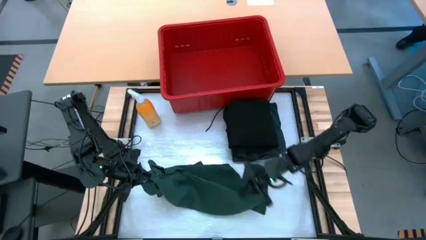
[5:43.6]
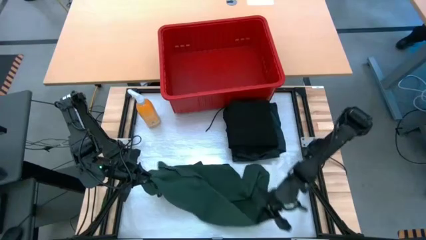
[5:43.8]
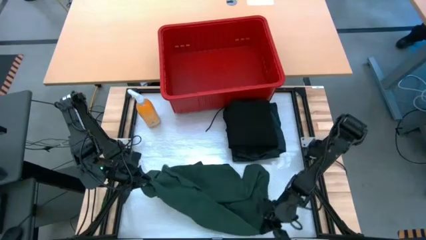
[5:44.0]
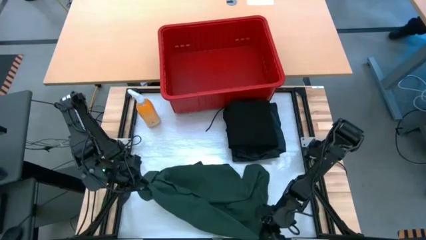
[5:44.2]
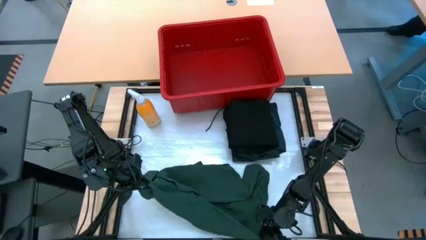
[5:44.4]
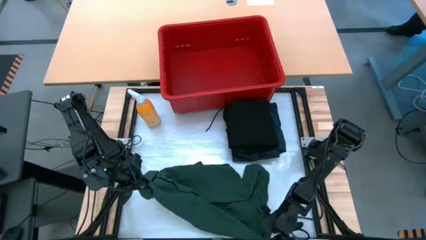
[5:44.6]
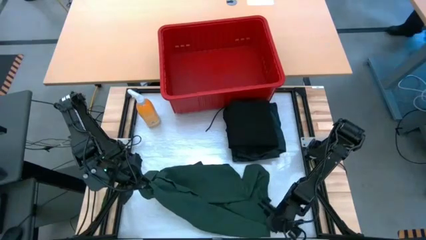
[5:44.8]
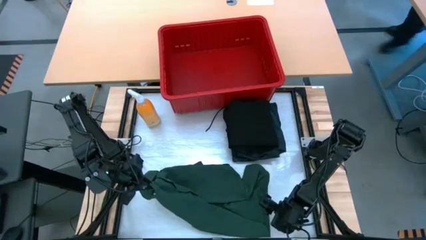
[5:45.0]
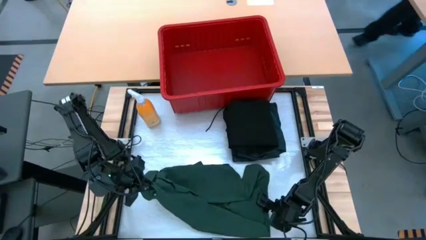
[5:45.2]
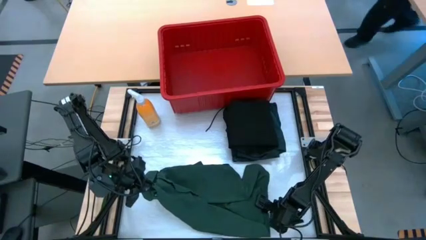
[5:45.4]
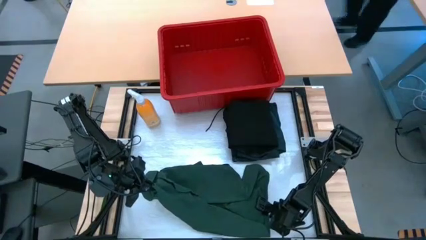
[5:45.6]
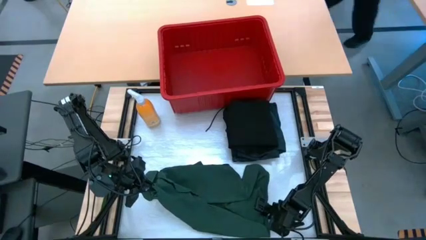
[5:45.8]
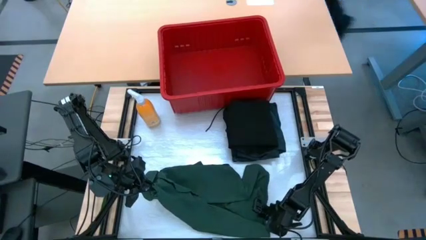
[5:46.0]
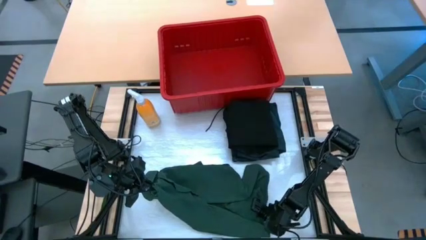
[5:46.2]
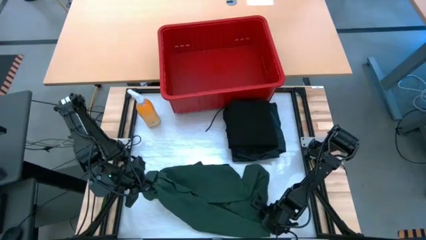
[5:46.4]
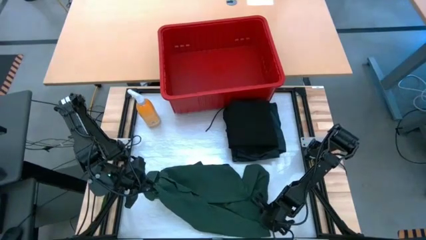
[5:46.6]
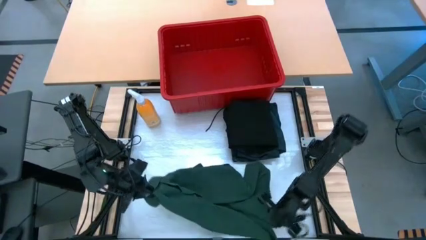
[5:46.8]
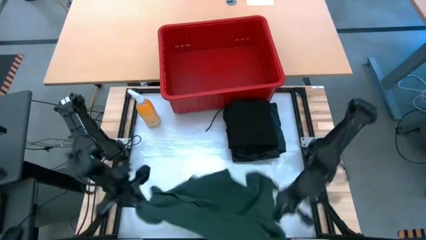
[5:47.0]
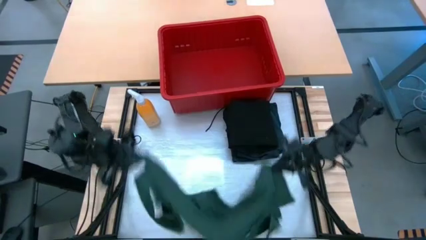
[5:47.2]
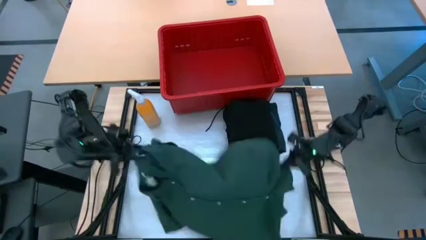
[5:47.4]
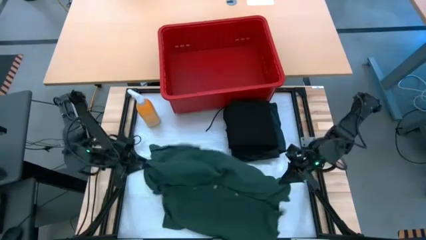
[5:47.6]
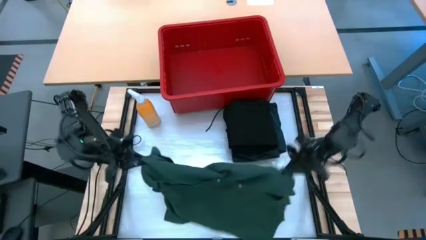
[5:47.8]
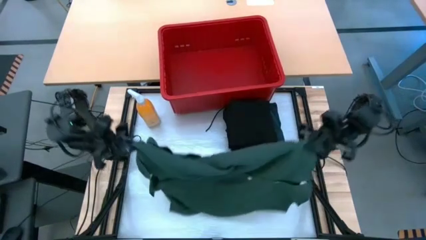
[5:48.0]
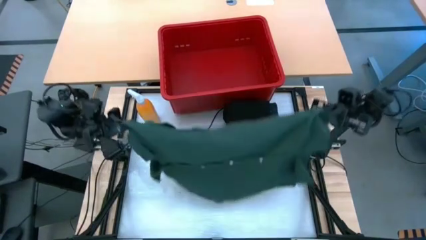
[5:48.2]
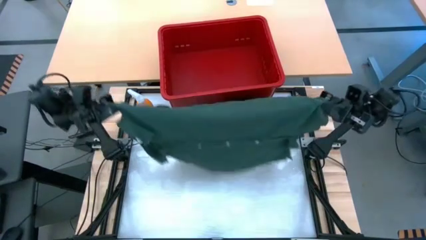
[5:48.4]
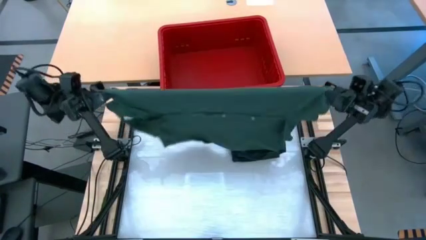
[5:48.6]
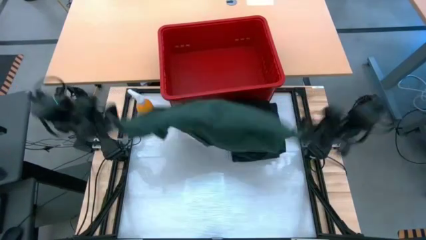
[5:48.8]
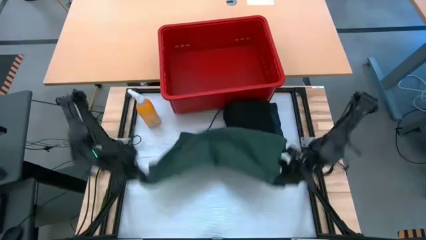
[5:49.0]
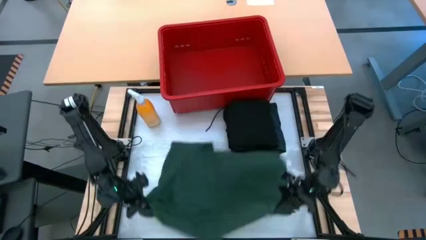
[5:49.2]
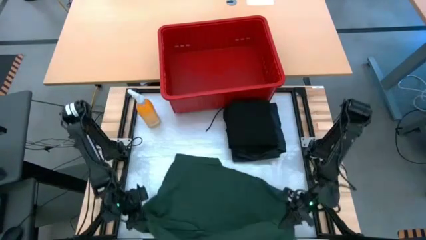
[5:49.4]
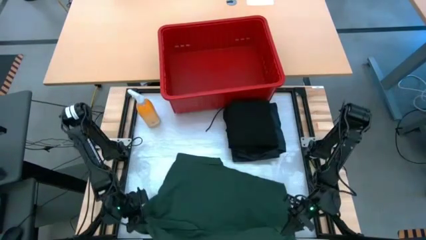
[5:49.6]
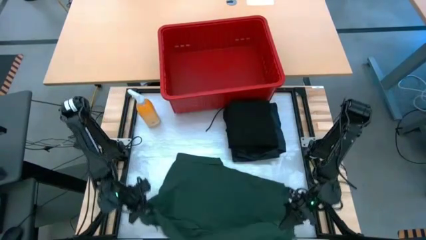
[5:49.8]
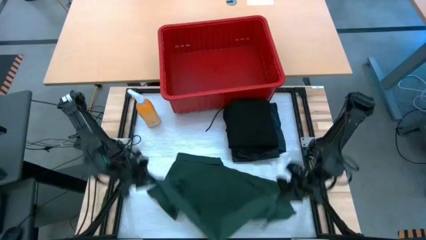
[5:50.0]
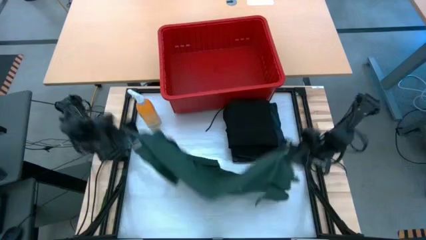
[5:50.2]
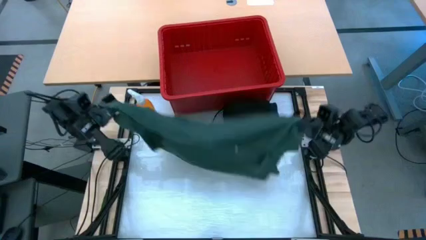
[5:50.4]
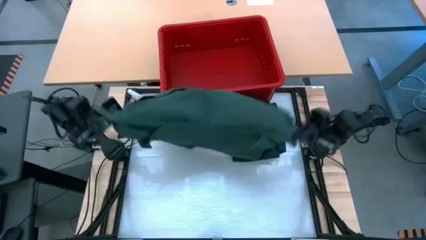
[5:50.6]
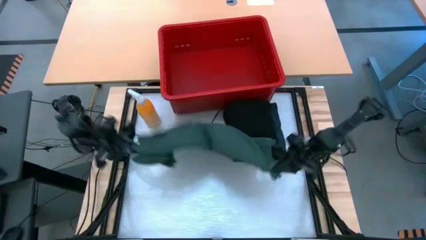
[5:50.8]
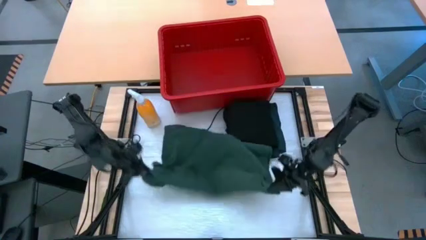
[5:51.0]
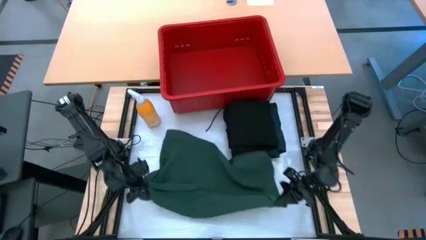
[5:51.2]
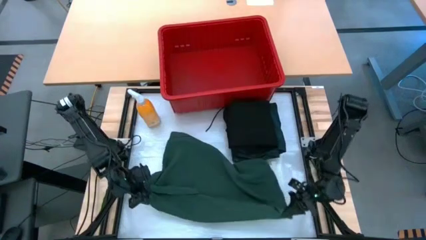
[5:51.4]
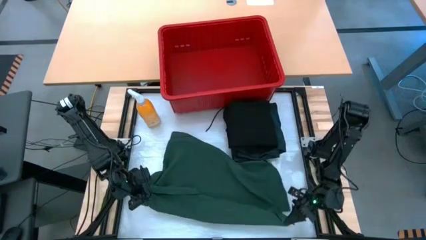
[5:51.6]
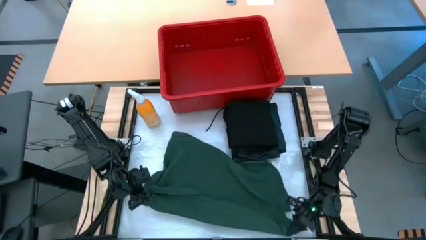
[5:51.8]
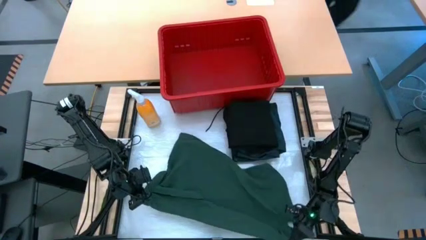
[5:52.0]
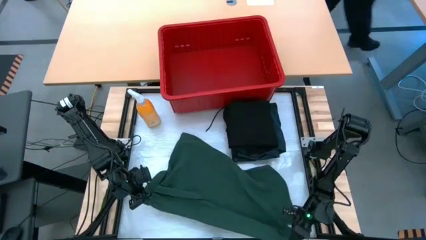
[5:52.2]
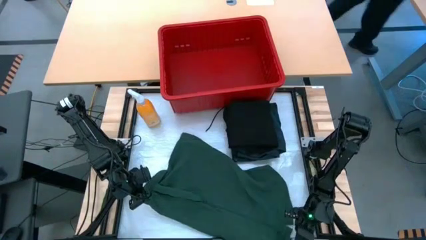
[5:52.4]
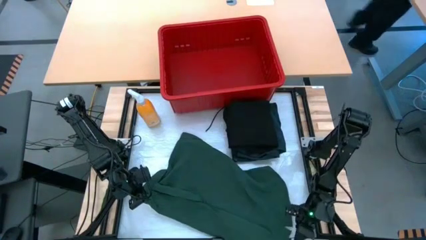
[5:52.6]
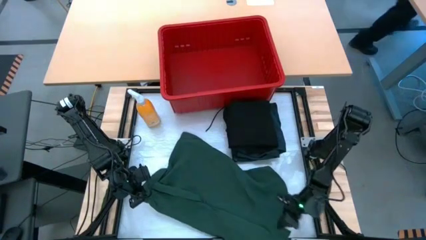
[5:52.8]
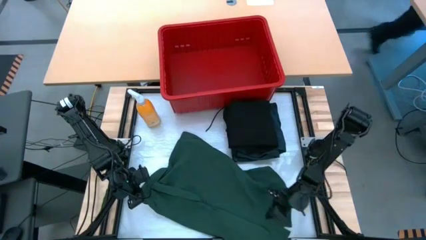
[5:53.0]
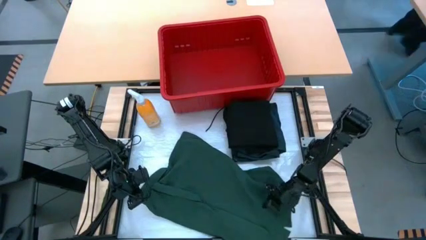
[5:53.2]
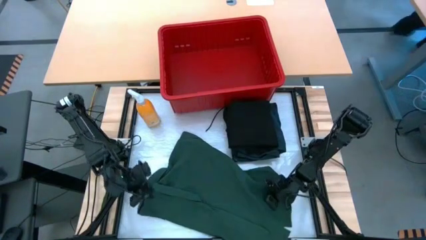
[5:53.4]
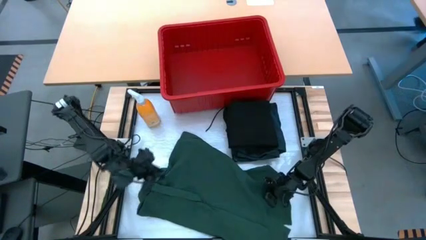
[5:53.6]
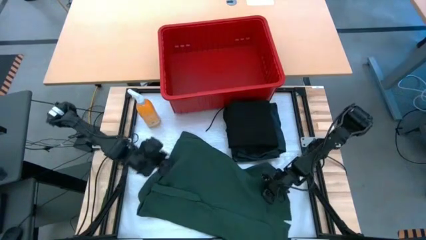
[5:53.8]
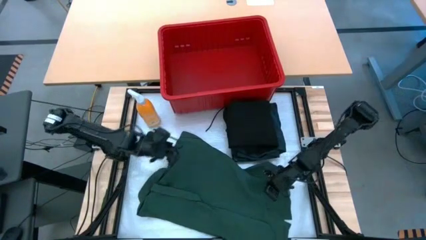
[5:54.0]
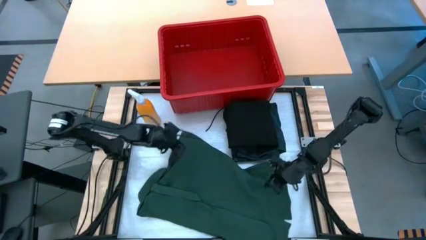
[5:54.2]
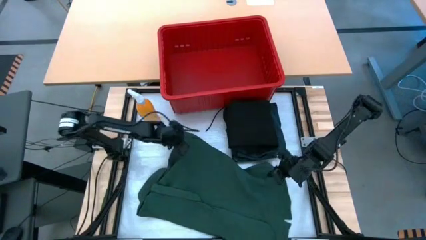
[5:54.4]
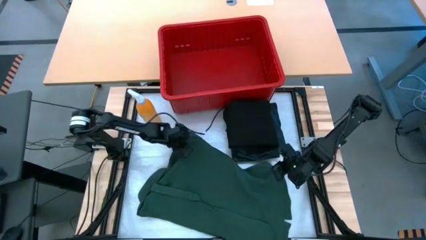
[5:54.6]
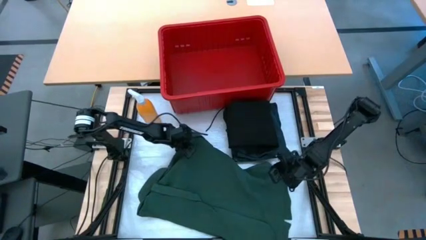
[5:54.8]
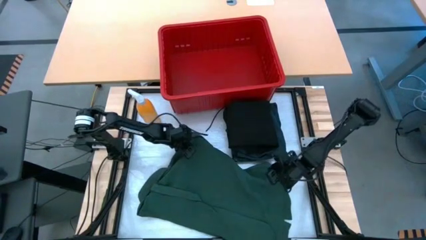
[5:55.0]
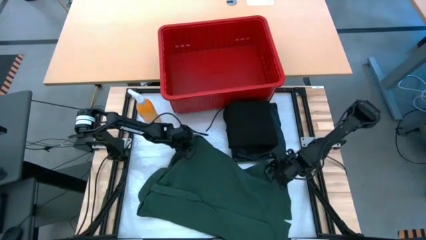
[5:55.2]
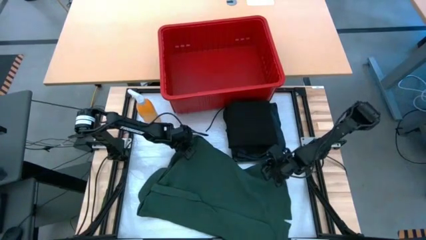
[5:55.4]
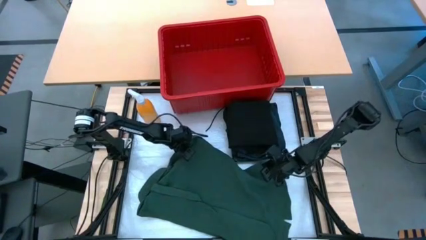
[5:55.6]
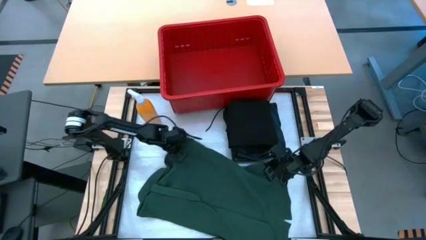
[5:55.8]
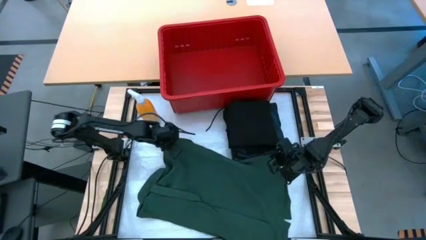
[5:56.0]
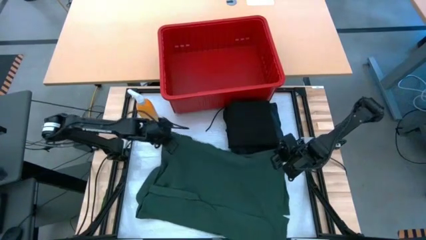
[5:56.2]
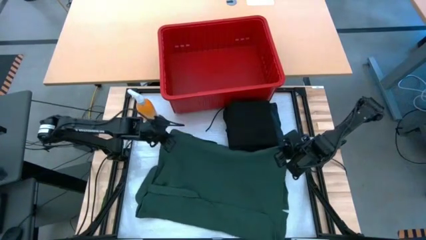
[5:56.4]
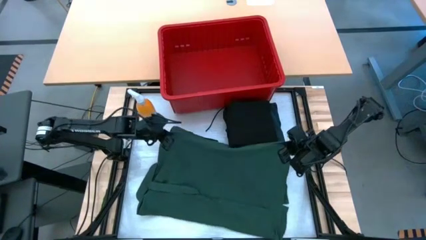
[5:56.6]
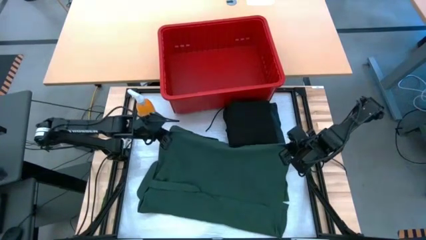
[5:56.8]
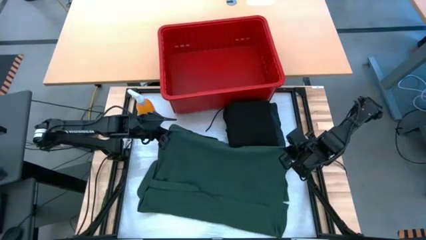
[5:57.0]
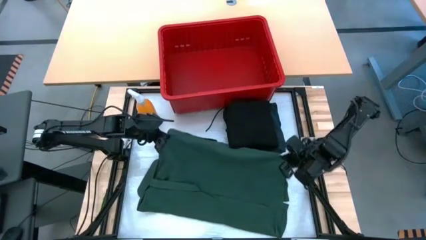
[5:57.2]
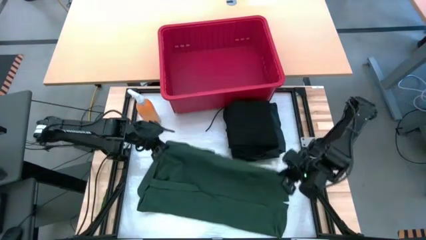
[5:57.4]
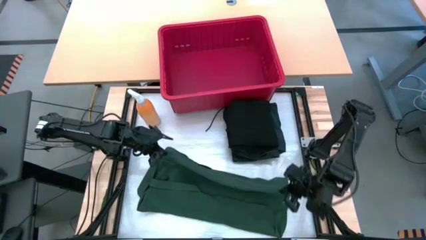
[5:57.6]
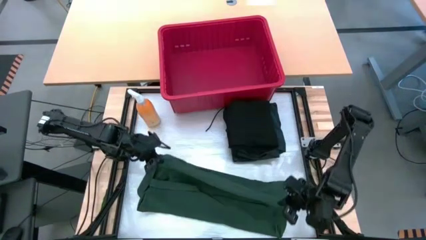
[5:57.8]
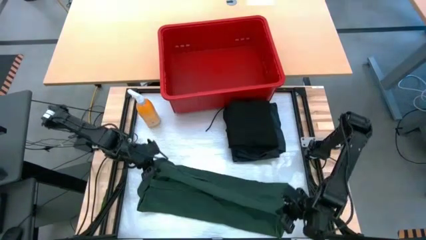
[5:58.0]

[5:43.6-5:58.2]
Task: Fold Laundry from Bin
Fold the green polo shirt
